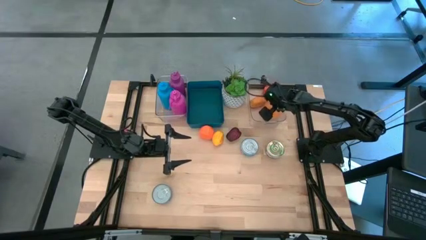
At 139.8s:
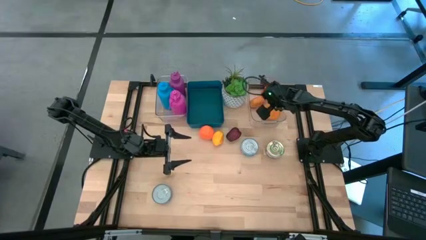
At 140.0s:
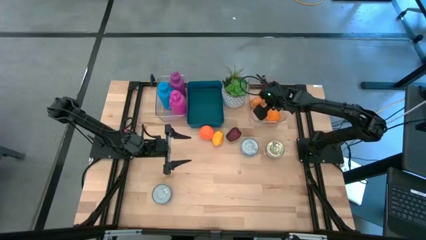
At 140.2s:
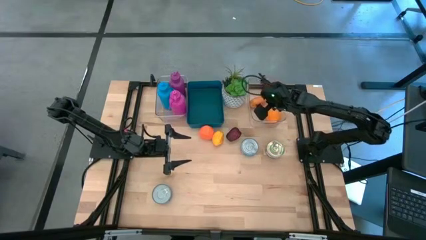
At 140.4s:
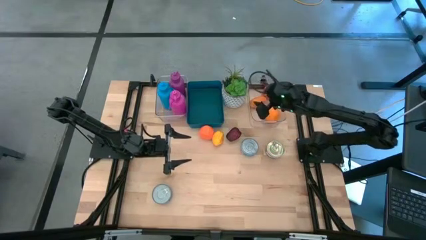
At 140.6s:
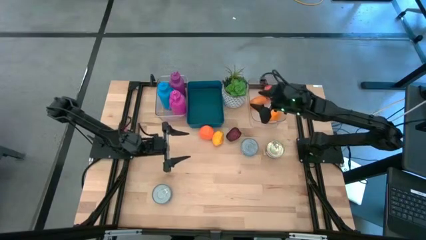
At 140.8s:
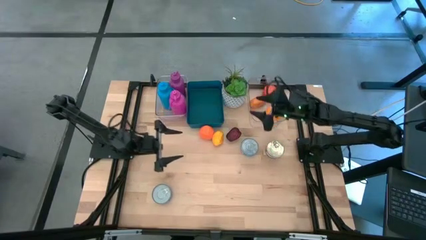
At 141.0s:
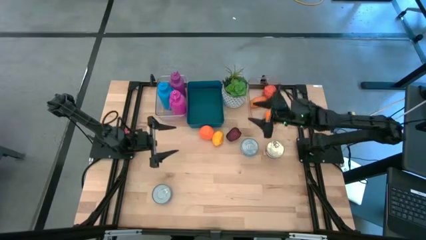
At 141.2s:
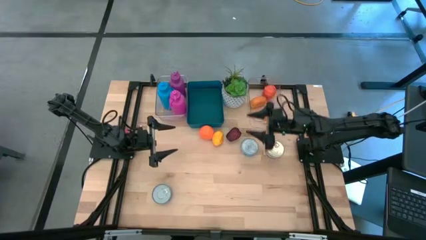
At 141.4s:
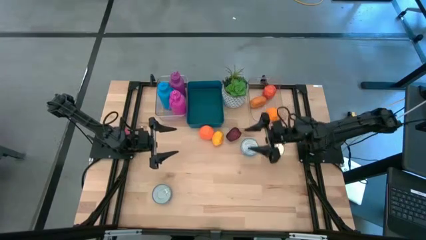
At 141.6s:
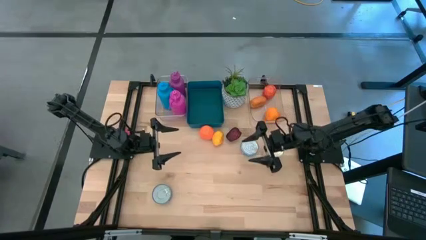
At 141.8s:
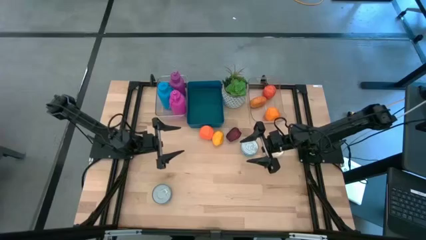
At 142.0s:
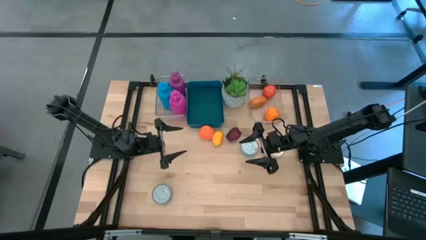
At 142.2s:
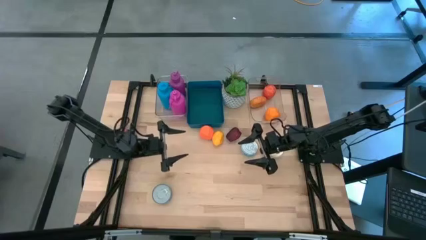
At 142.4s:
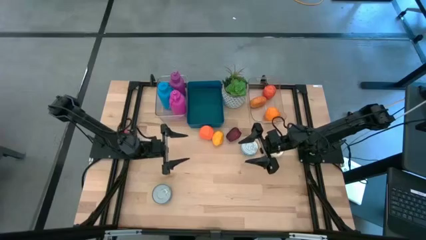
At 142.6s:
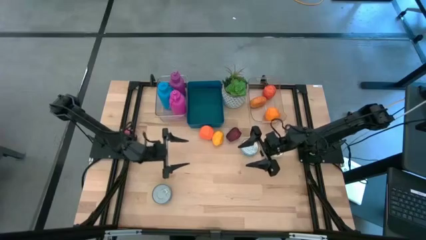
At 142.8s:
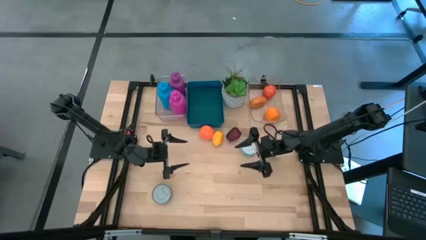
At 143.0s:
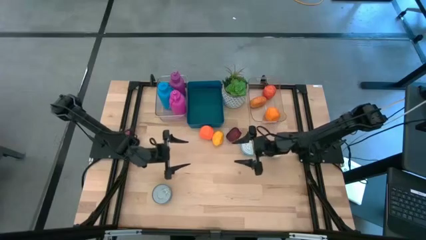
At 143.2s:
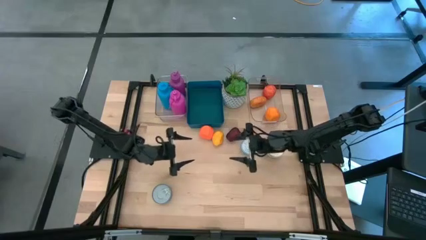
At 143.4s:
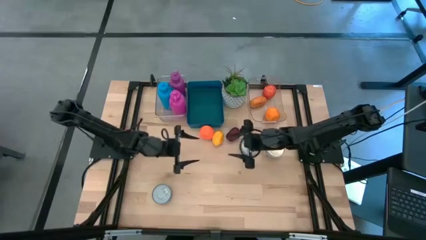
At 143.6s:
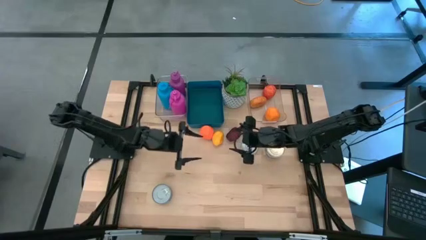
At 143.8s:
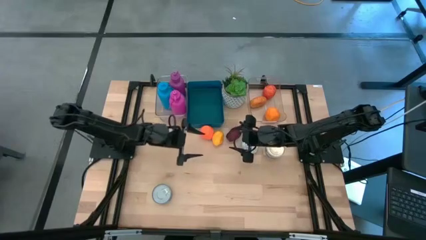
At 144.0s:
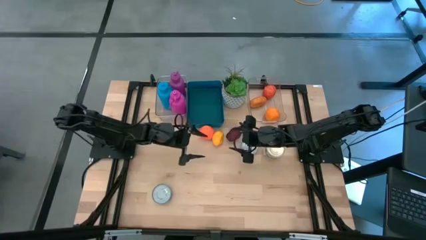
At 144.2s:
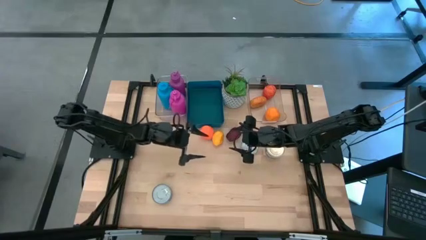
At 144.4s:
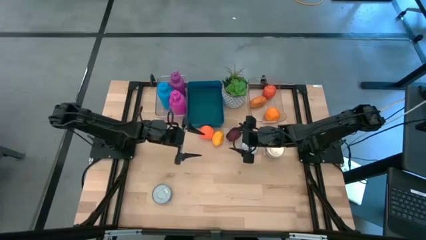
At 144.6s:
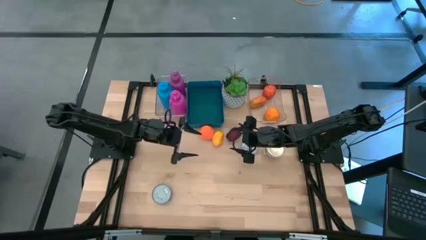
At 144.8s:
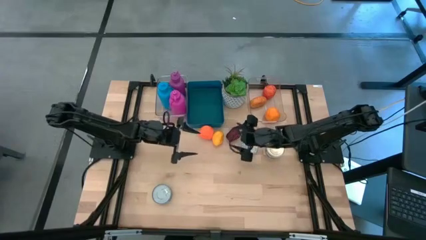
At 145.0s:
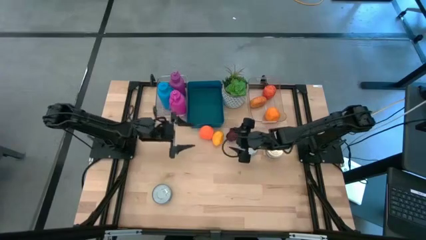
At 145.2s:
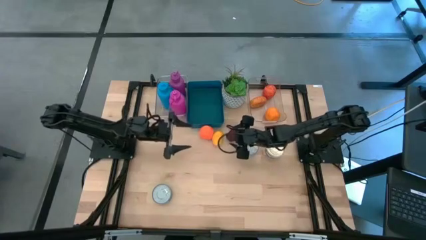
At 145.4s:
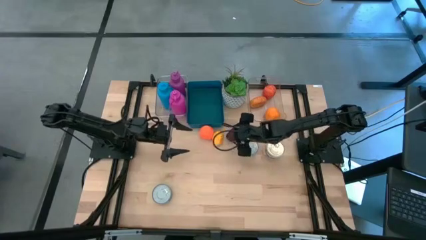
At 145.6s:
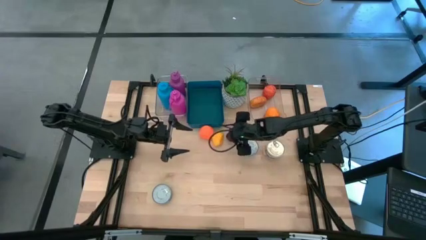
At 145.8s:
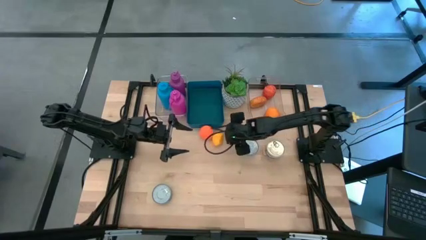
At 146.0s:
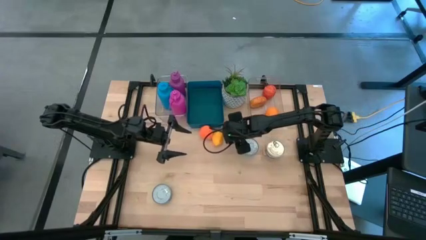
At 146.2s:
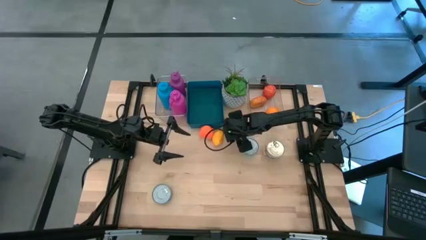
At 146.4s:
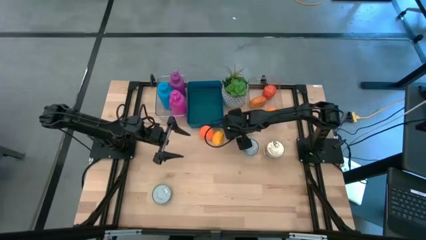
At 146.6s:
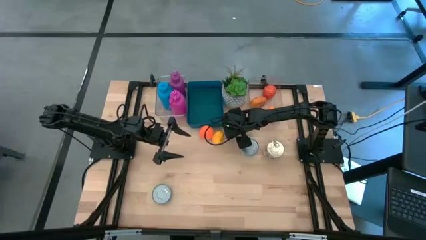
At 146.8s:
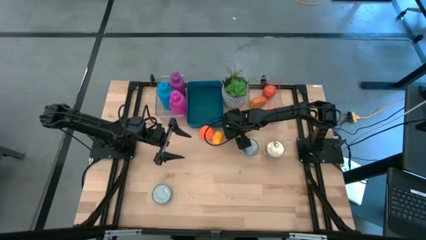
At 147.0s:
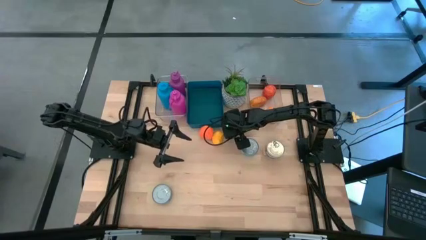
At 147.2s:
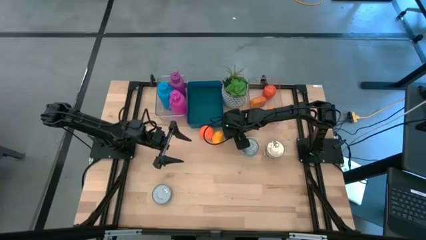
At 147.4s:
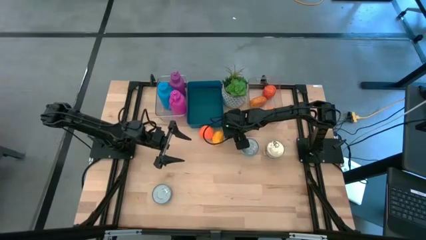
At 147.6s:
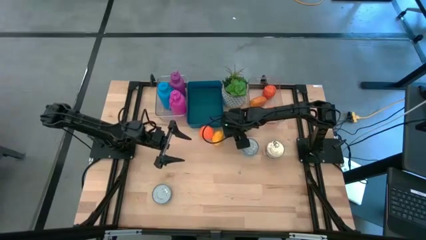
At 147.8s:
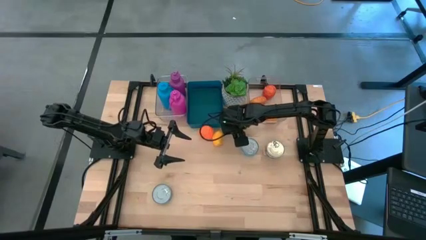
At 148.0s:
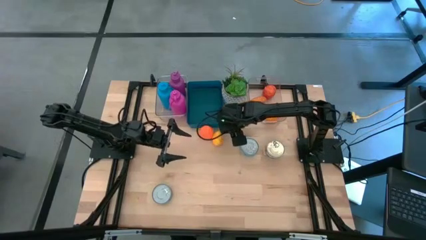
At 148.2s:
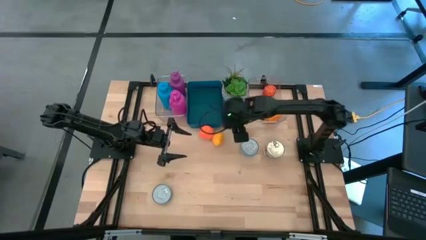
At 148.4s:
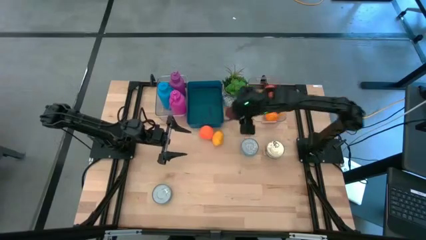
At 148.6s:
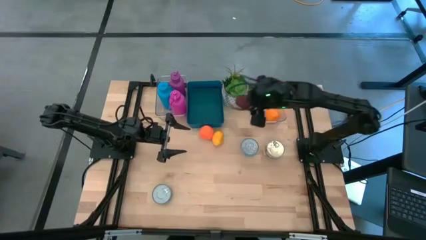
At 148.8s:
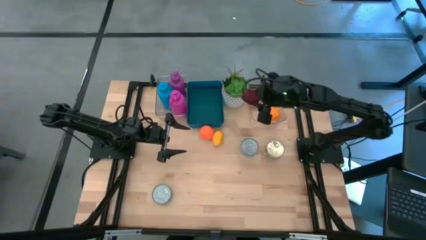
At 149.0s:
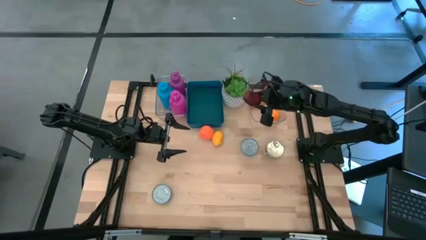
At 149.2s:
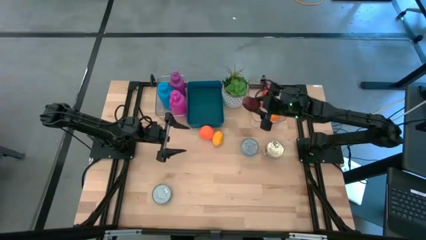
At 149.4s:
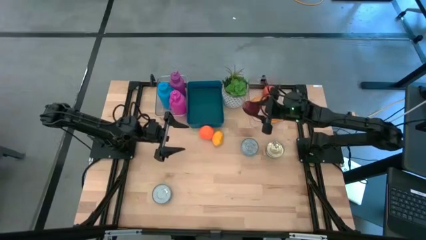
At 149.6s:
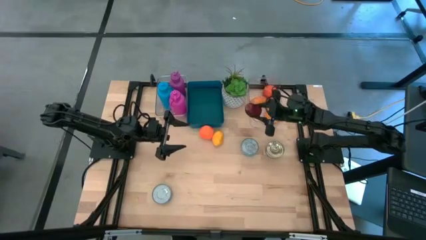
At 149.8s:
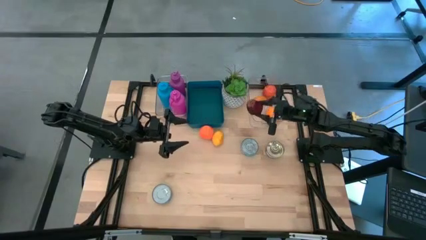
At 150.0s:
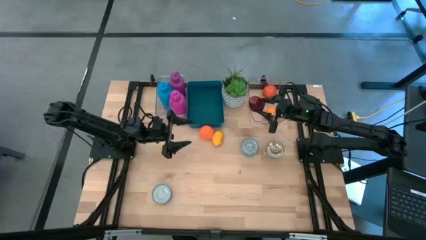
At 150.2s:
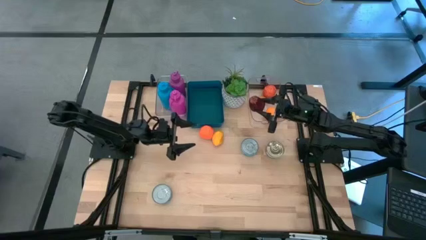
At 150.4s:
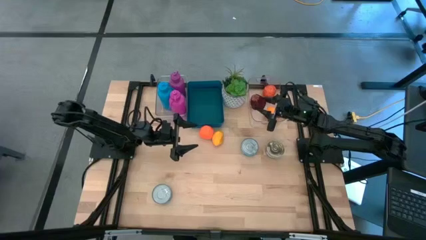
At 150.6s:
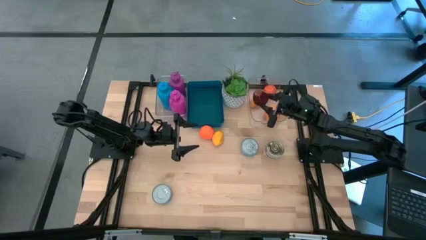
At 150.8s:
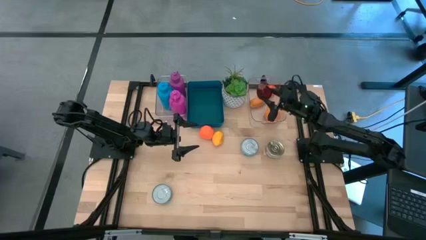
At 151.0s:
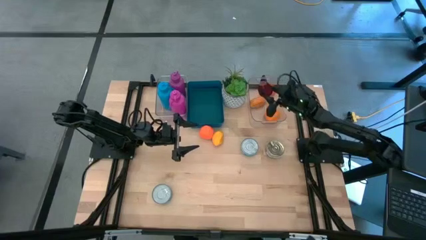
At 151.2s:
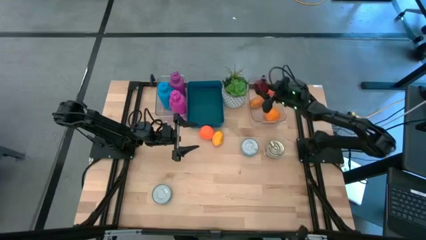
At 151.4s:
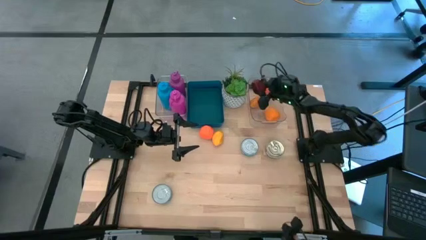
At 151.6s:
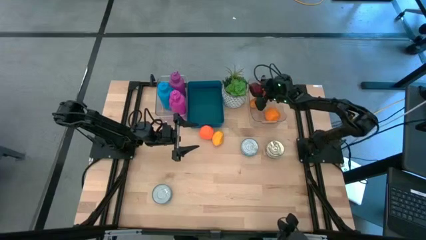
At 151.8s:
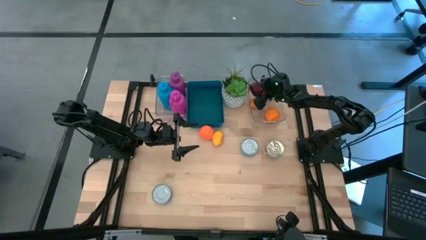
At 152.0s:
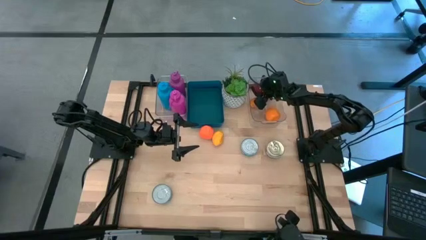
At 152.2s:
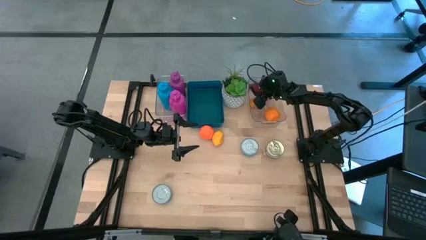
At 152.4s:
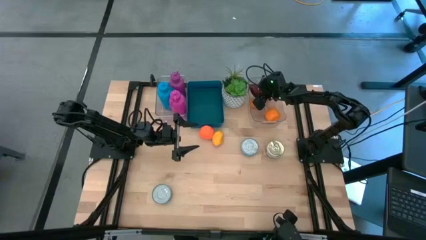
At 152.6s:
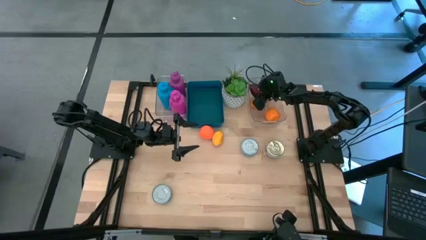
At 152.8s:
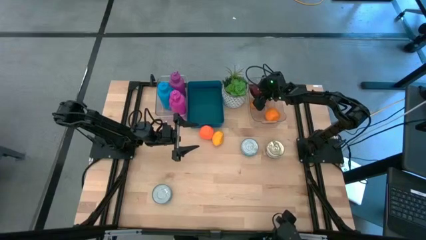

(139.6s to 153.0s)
Task: Pick & Place Food Item
Put the red apple into the right transparent bin

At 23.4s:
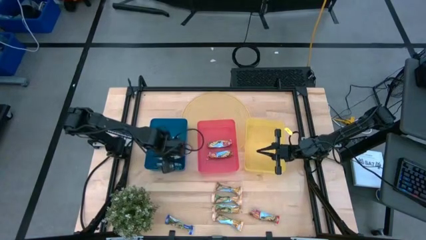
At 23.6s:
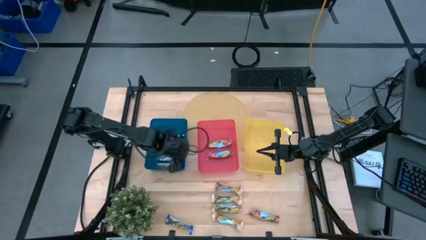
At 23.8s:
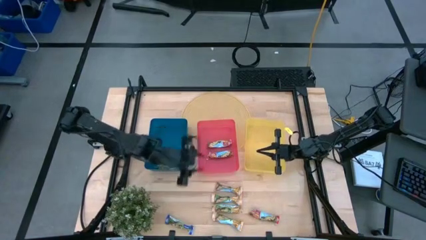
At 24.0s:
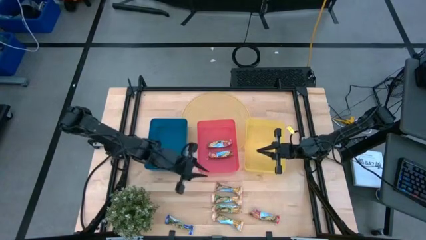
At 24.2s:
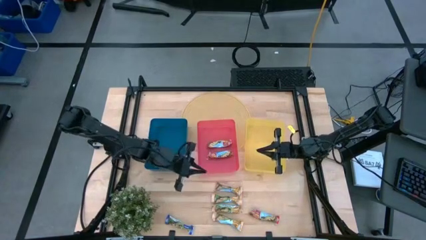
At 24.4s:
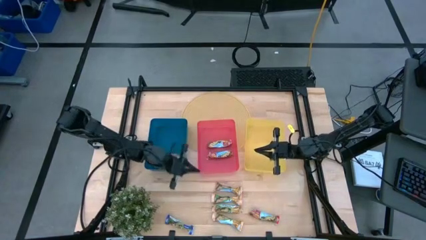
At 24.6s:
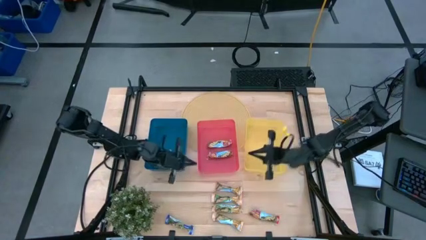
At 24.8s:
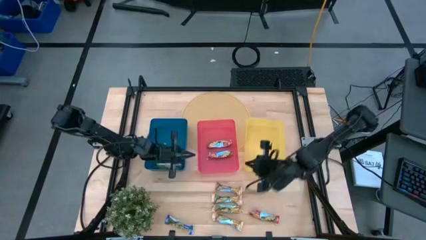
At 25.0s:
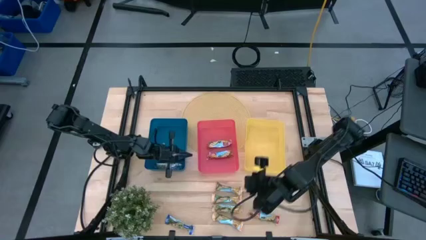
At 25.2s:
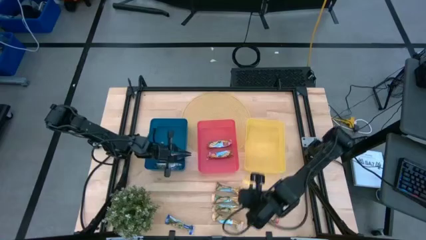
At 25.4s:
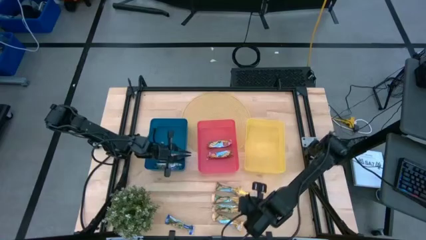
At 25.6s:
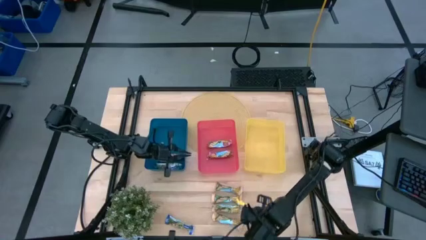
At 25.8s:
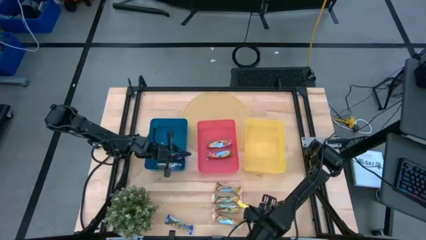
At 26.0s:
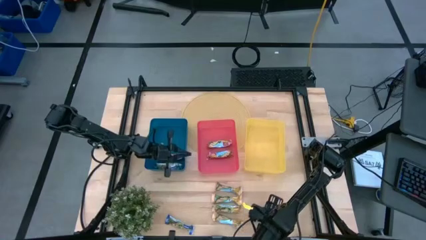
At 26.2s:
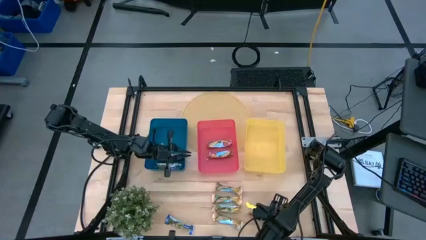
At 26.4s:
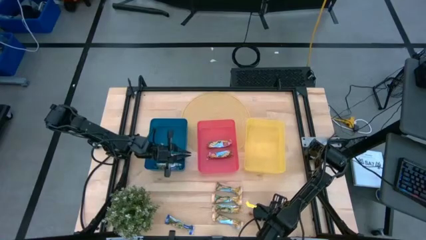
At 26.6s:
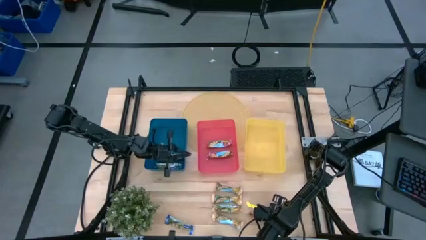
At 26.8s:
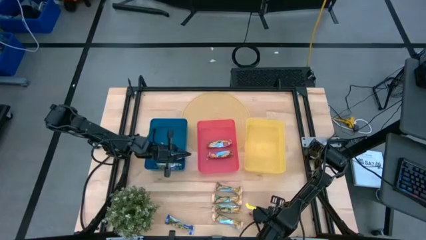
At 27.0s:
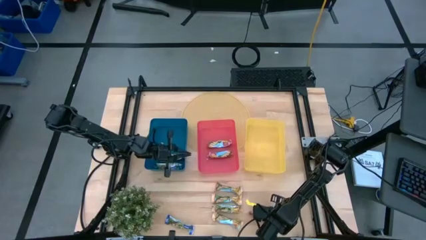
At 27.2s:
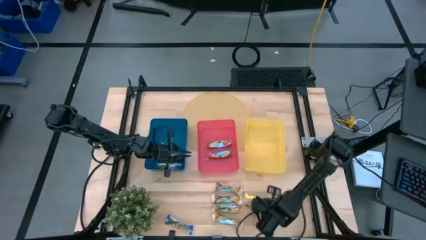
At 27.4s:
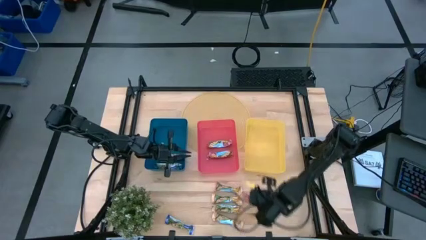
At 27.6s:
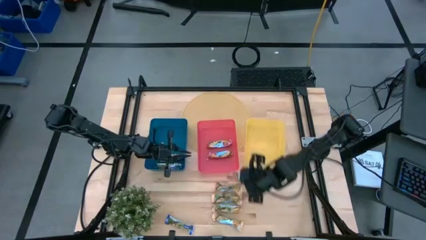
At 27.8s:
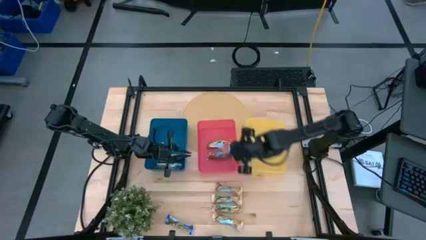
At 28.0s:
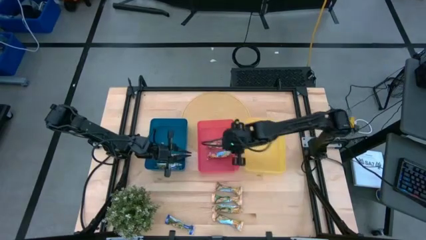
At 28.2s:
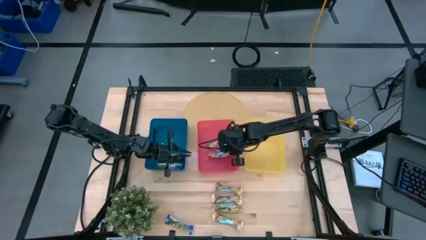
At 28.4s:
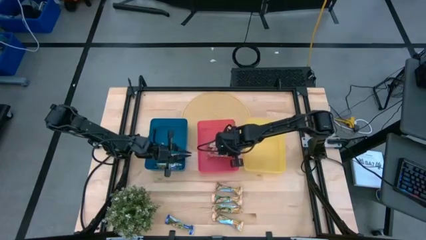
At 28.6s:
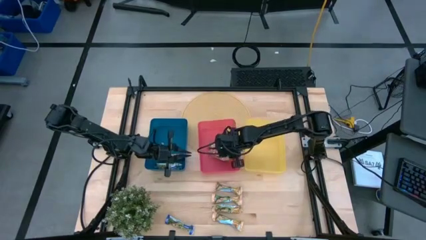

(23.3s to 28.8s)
Task: Pick and place Granola Bars by type
Put the red granola bar into the red bin
